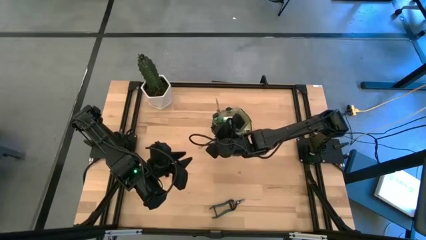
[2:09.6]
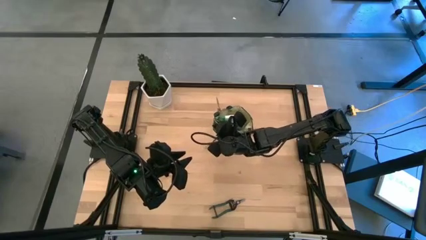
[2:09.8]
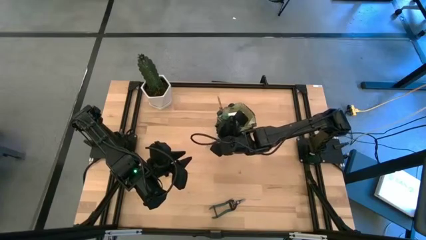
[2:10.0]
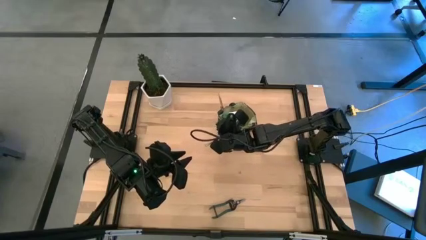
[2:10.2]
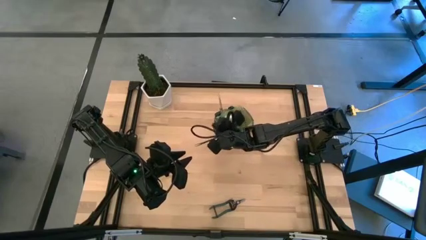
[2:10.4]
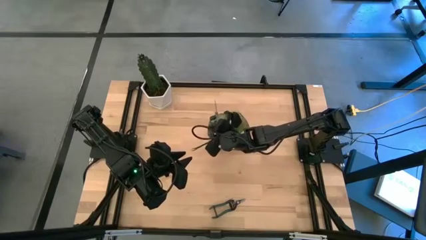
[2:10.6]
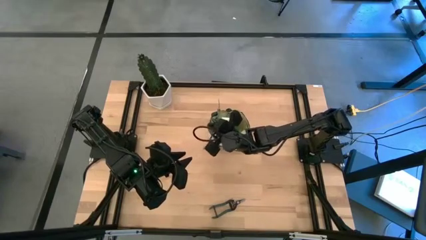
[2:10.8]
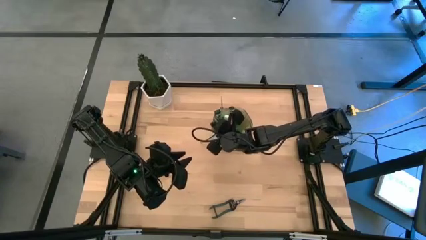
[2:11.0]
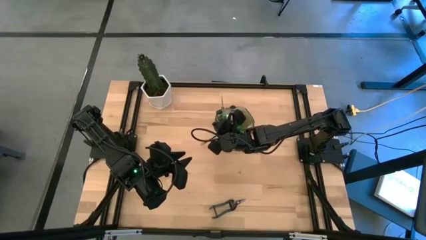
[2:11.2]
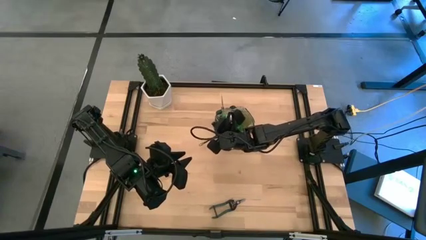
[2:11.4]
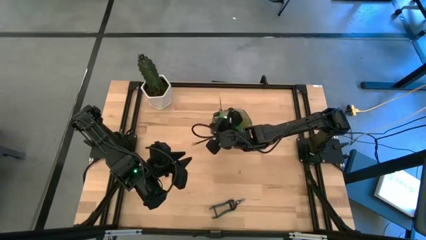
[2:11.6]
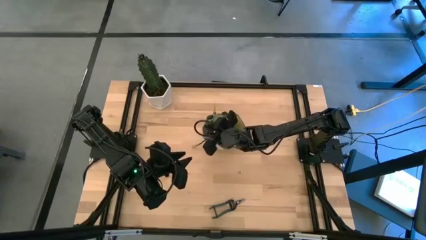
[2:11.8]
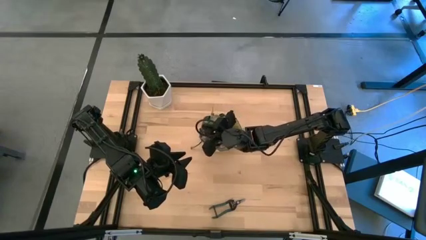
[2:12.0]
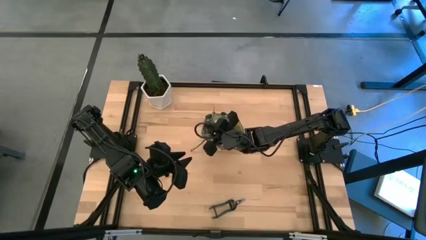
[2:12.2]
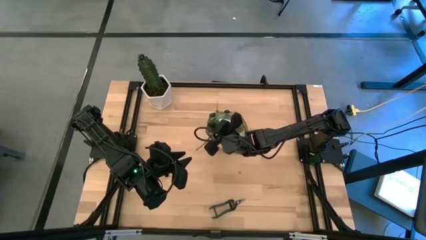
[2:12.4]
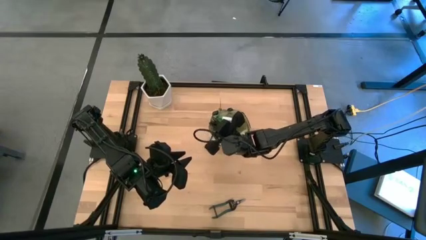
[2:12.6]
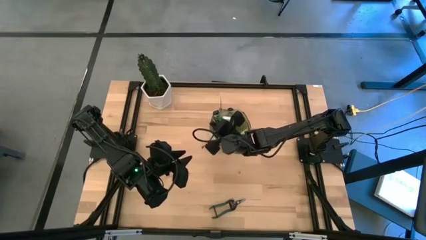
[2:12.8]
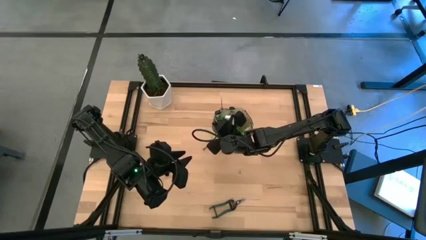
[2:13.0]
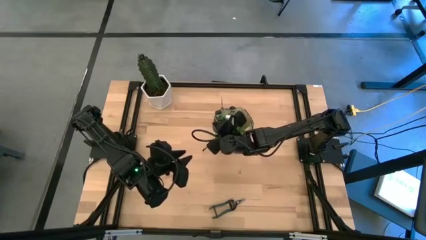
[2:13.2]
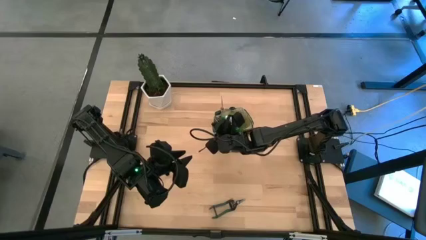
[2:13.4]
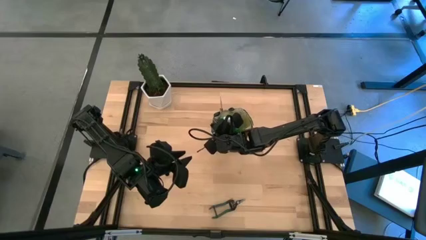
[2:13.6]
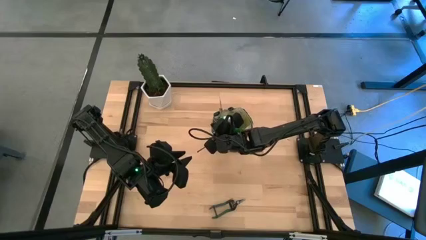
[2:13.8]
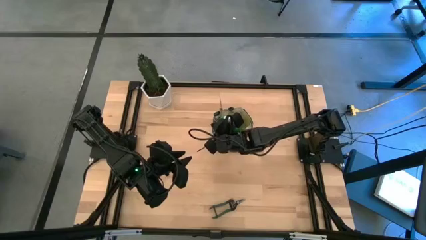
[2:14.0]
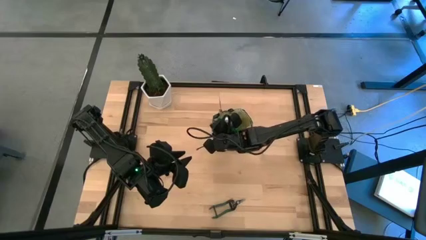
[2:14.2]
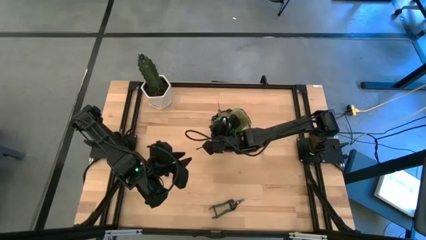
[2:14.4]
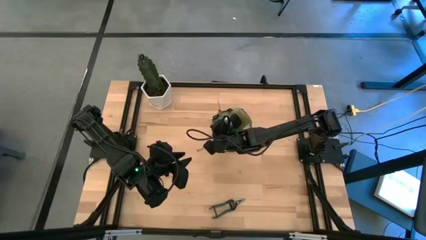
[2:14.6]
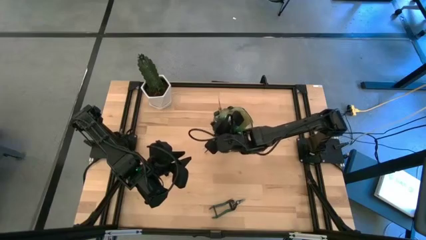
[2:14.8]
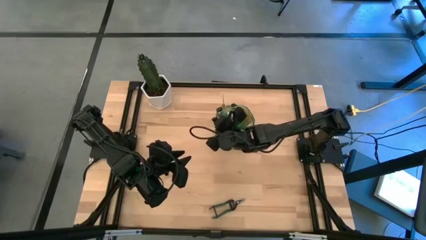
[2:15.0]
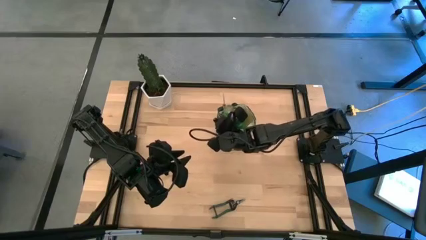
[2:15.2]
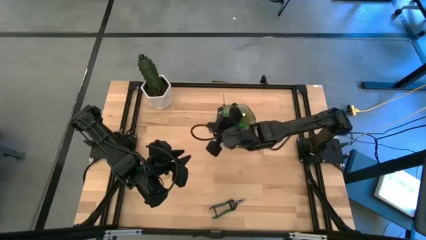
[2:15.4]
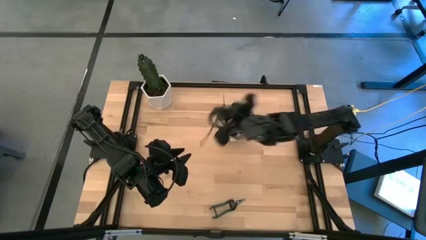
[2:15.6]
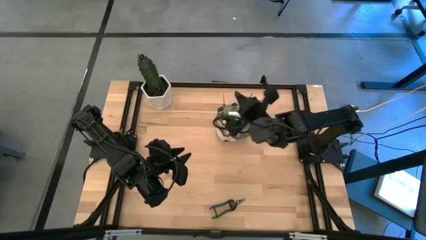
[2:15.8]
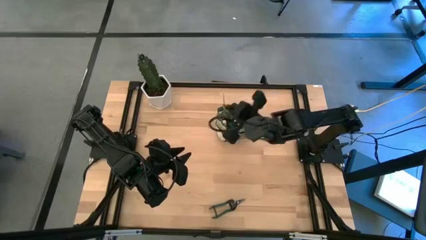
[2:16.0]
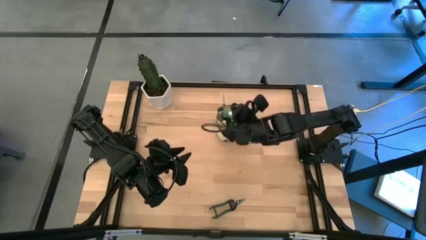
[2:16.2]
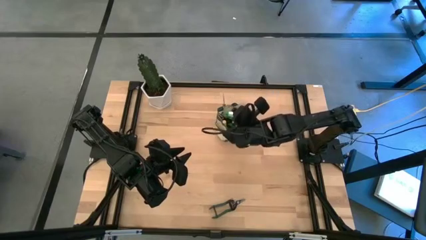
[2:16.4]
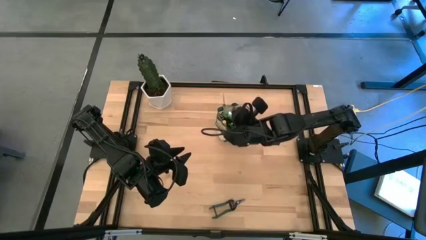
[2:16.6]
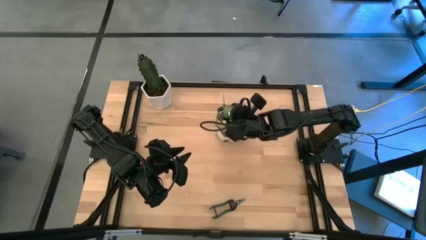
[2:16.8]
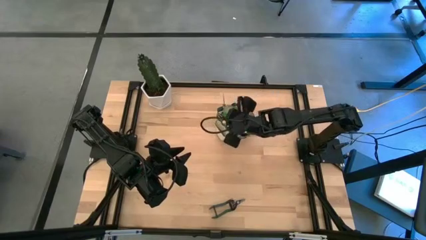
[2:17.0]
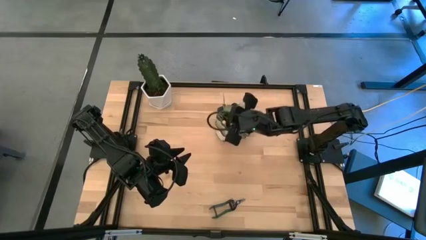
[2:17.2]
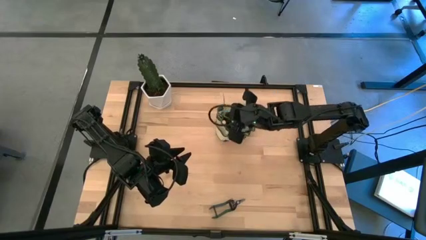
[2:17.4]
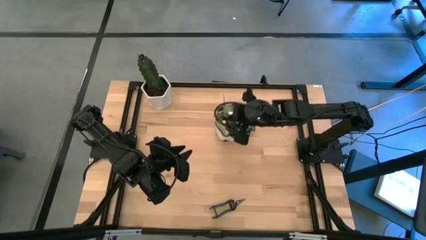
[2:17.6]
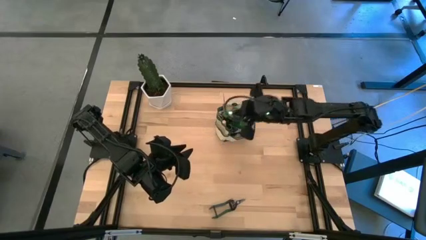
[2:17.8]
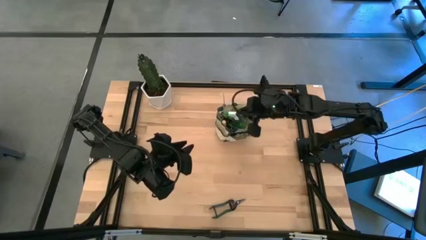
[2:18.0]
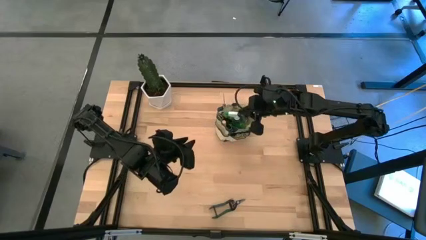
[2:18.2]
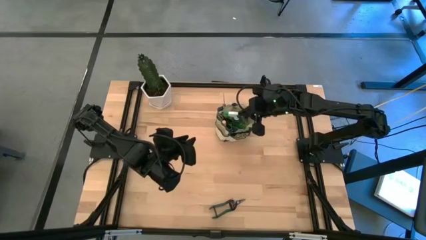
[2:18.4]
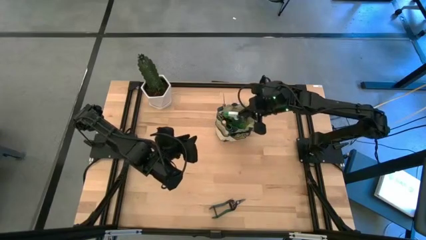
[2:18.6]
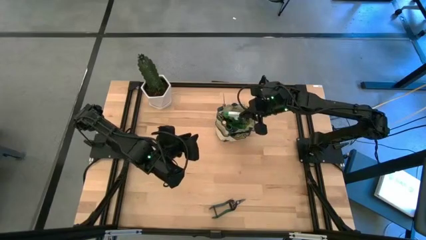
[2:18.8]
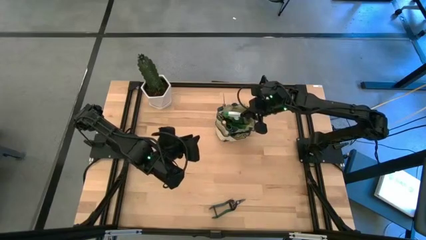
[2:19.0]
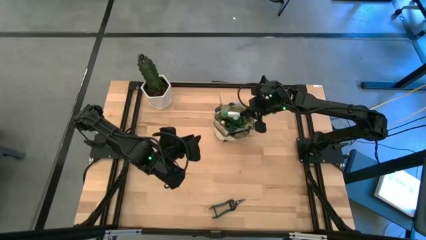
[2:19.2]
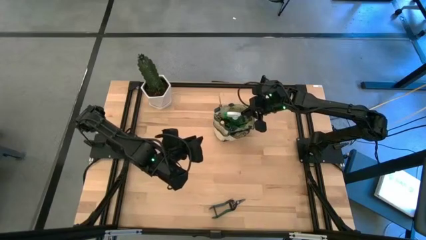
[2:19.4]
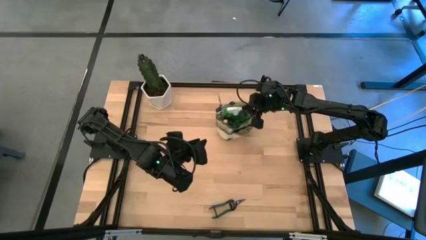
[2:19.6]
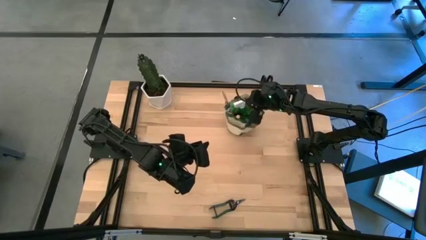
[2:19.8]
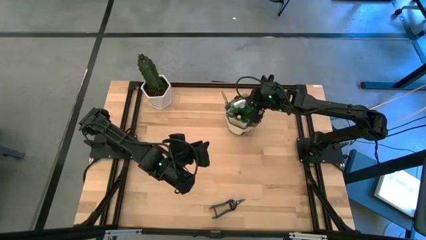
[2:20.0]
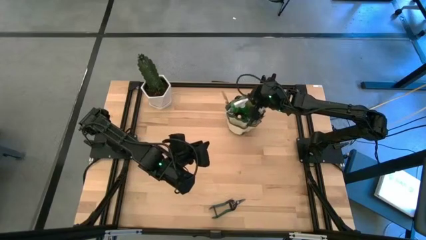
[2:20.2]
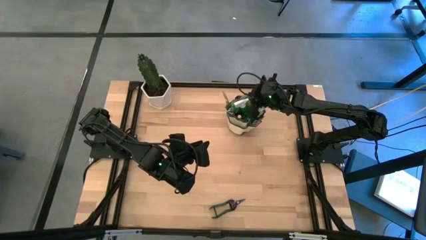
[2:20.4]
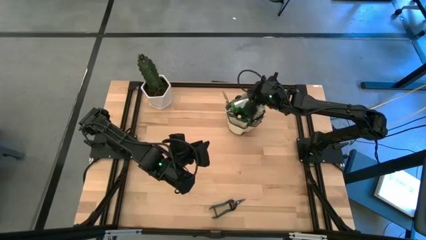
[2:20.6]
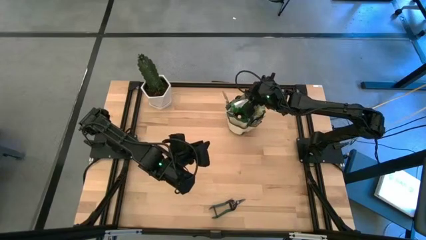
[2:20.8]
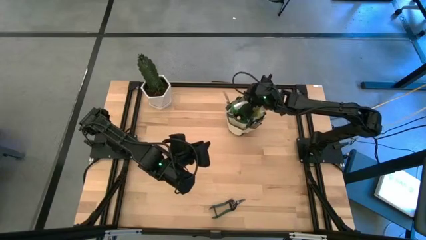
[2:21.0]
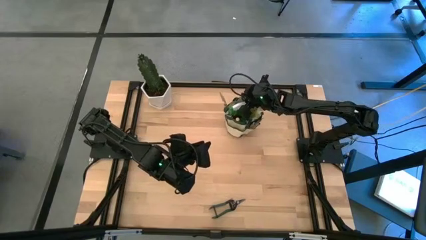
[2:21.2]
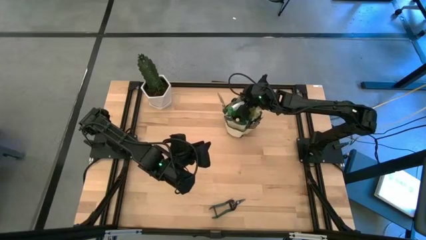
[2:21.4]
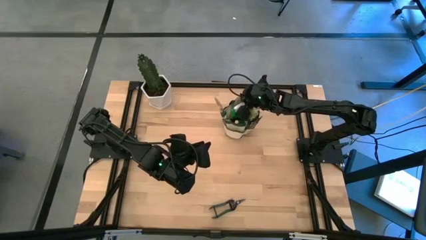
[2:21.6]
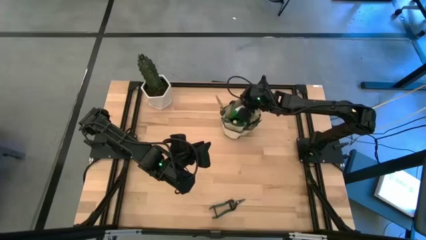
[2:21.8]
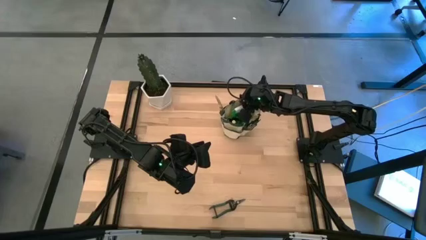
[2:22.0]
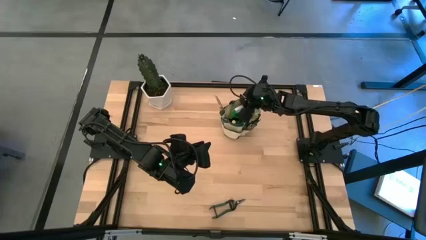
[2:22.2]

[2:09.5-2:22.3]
Task: Pick & Place Garden tools in Gardening bag
Put the top shear scissor into the gardening bag

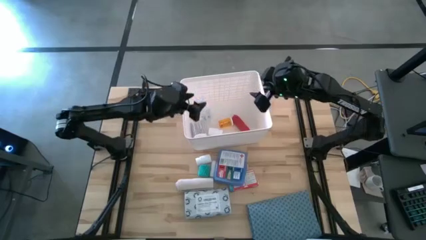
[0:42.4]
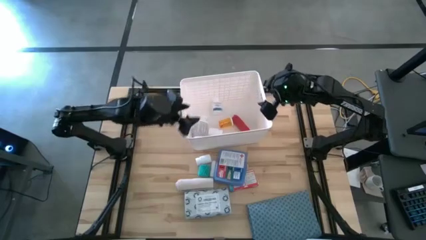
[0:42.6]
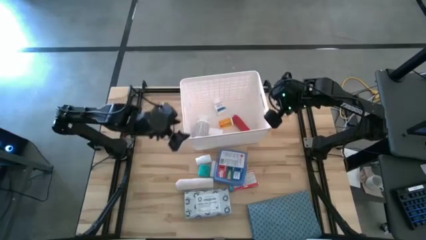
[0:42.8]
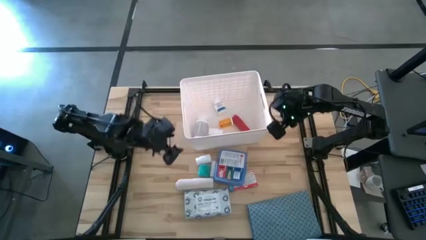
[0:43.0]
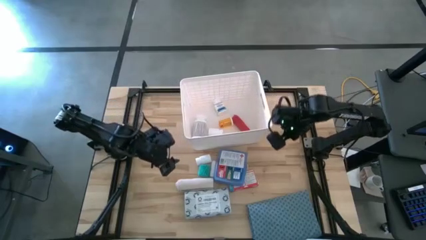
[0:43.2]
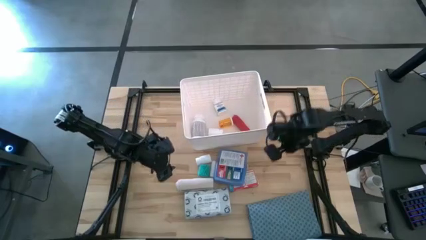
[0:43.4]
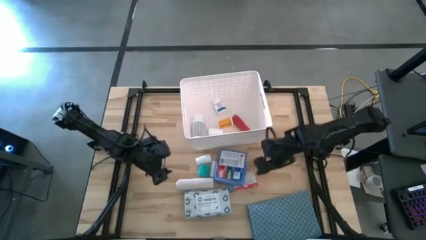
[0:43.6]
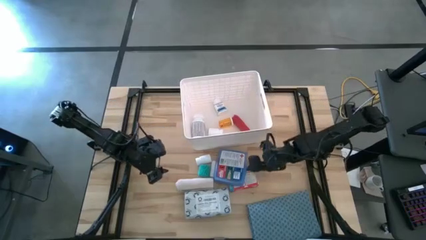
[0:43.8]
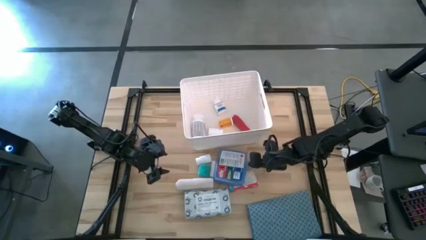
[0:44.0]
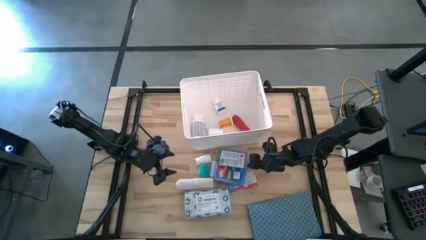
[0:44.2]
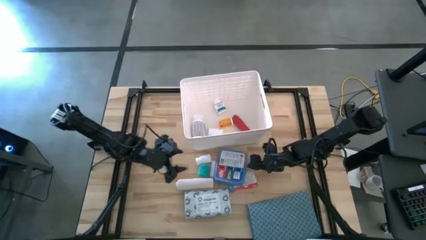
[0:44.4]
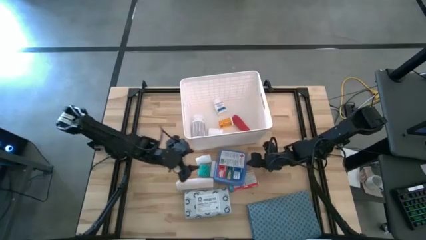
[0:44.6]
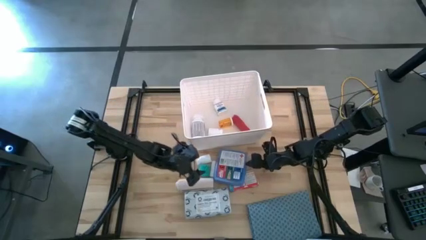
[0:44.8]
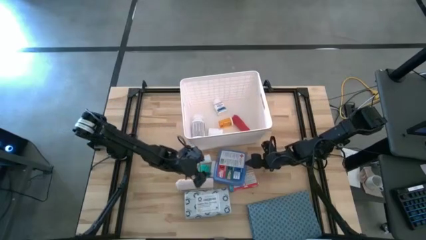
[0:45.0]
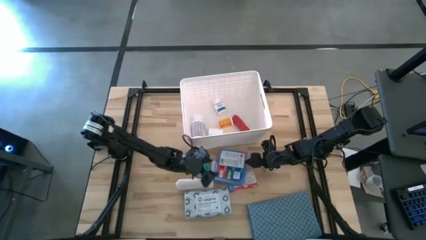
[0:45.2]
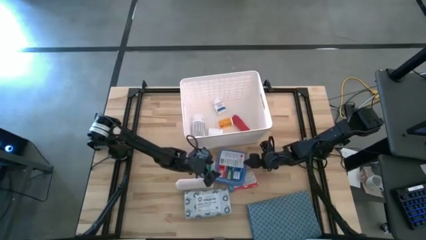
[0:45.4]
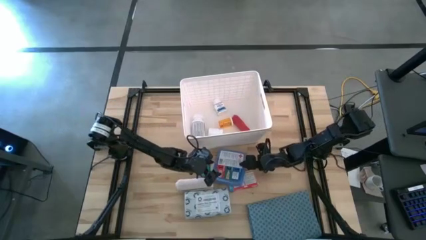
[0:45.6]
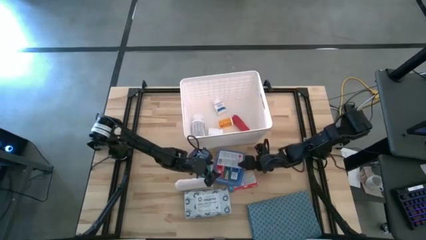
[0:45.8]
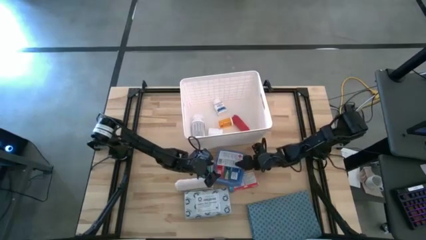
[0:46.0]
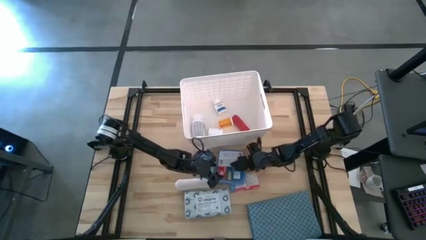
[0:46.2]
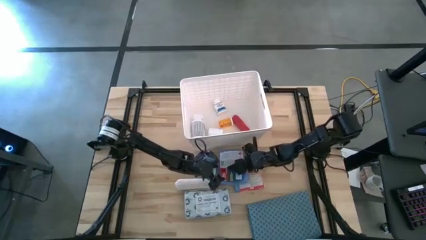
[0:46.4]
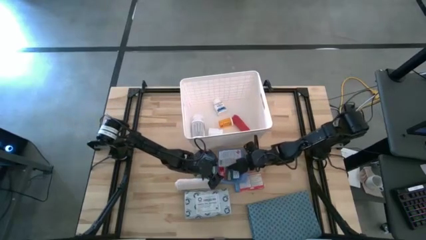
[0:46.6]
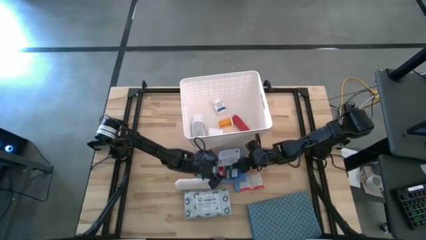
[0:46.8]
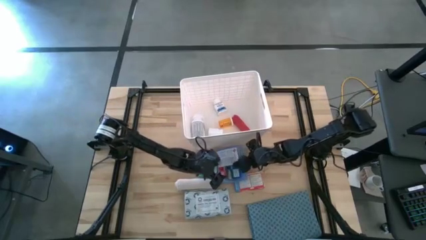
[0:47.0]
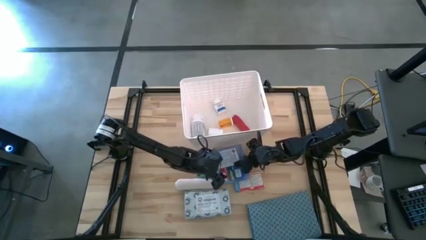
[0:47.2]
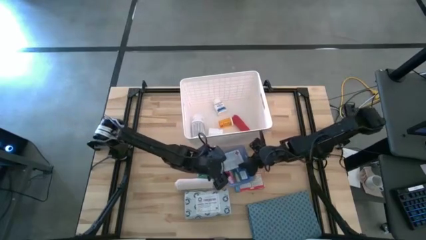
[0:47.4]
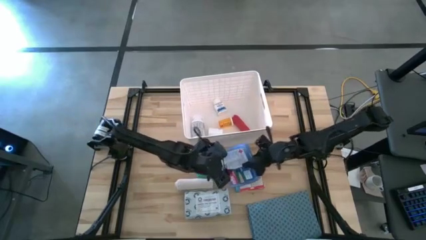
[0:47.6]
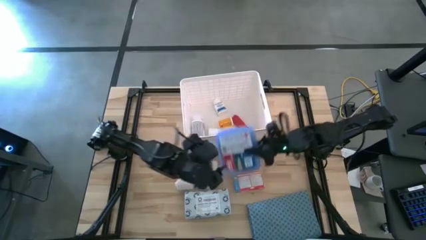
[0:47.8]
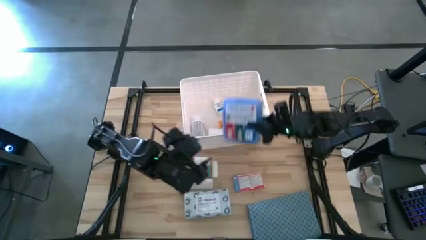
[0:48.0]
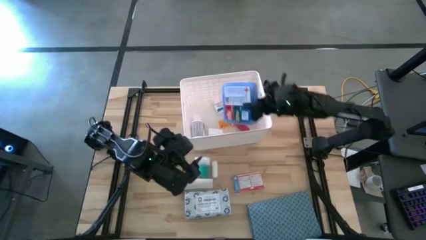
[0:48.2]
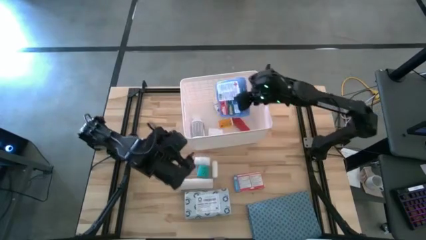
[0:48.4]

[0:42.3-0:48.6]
Task: Pick & place medical supplies in basket/bin
Put the blue first aid kit into the white bin
